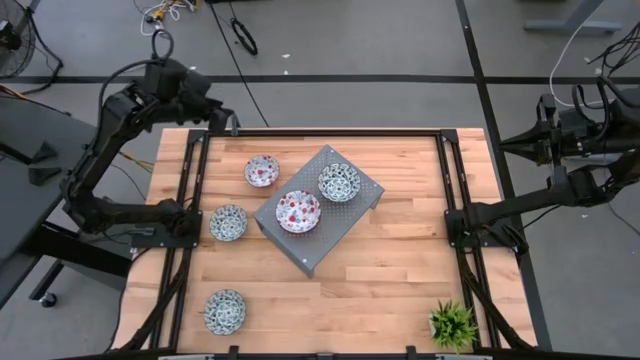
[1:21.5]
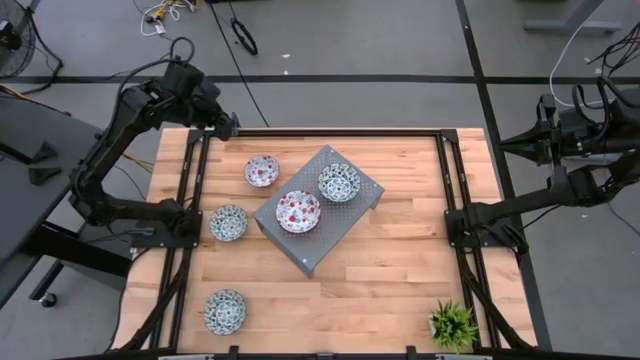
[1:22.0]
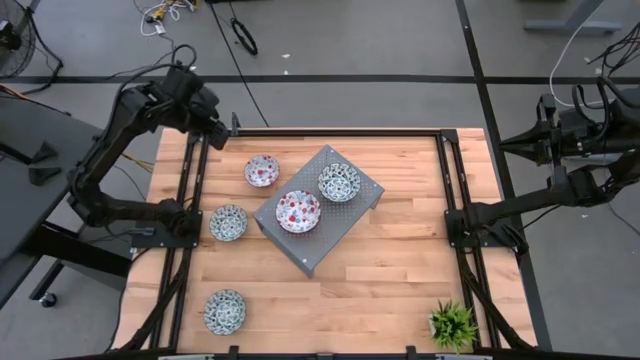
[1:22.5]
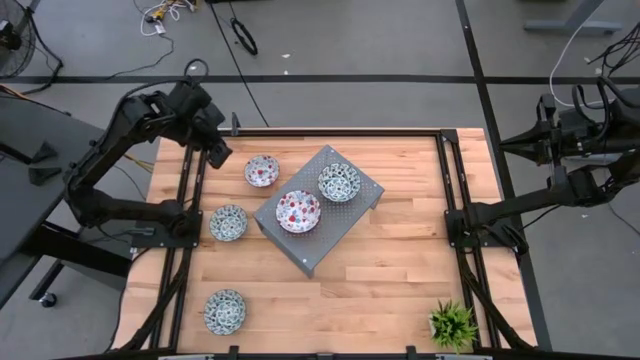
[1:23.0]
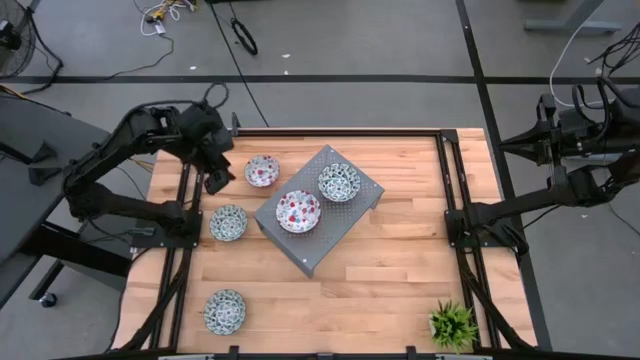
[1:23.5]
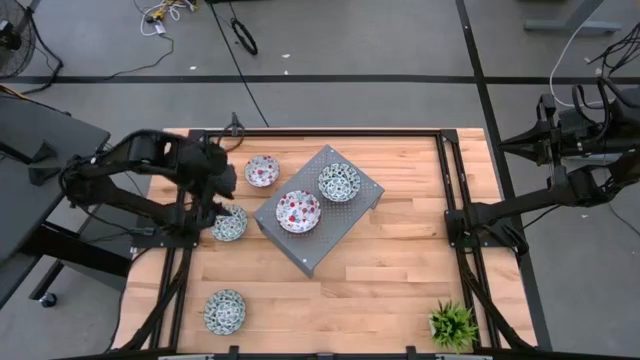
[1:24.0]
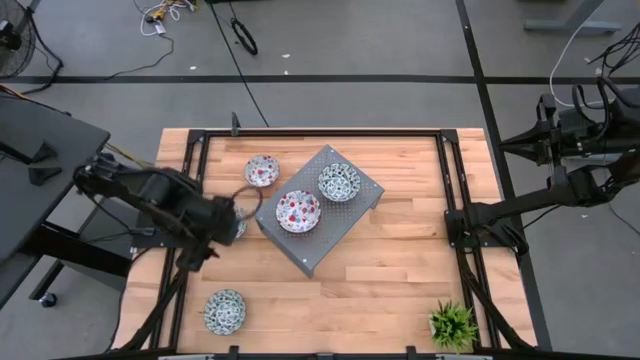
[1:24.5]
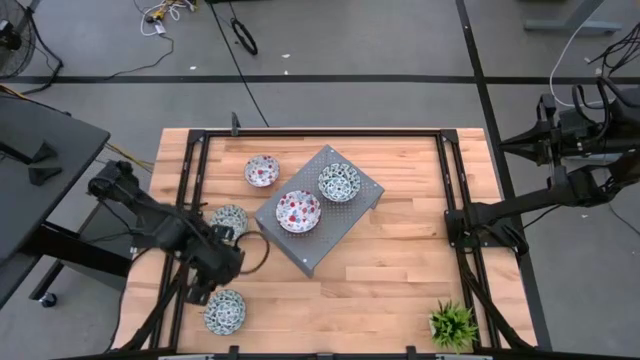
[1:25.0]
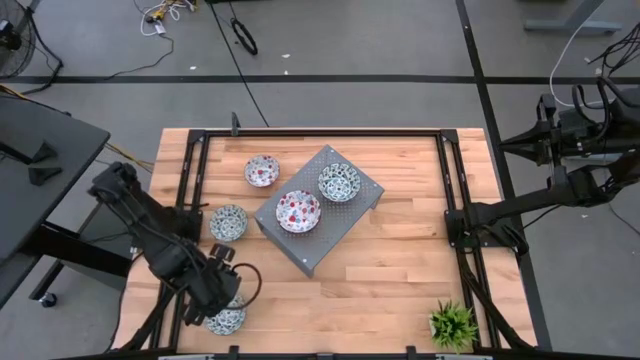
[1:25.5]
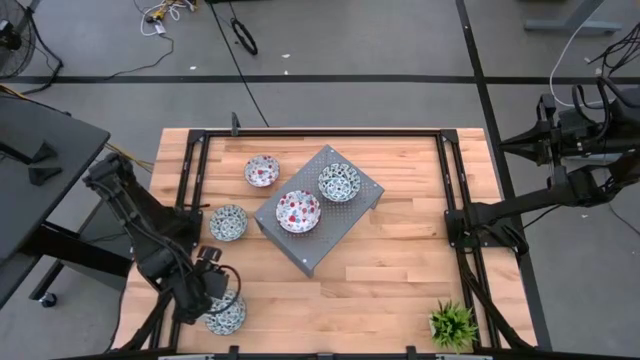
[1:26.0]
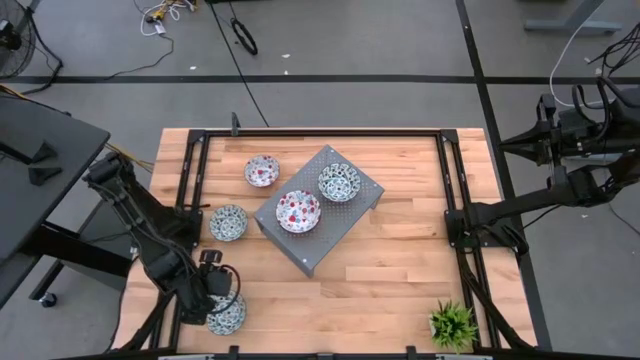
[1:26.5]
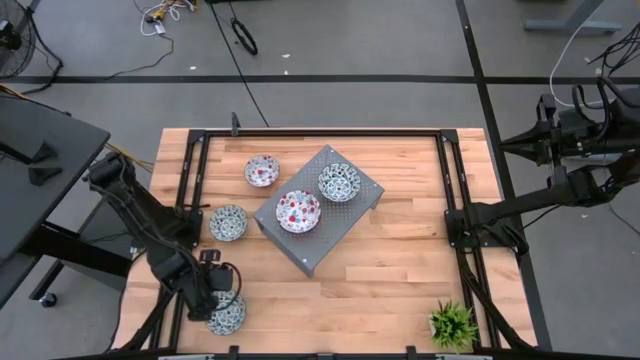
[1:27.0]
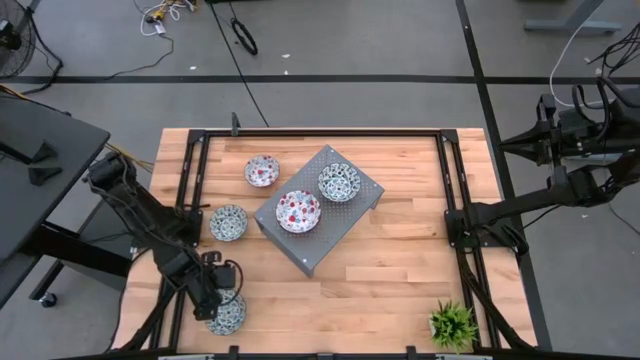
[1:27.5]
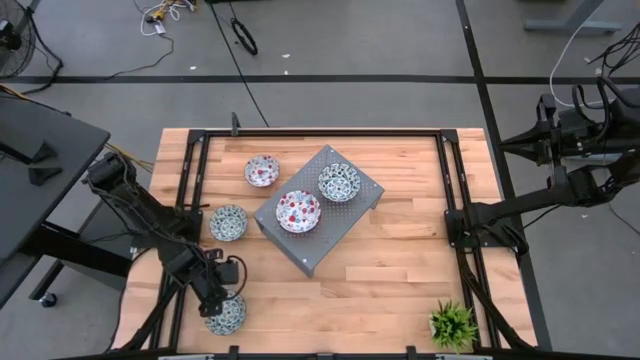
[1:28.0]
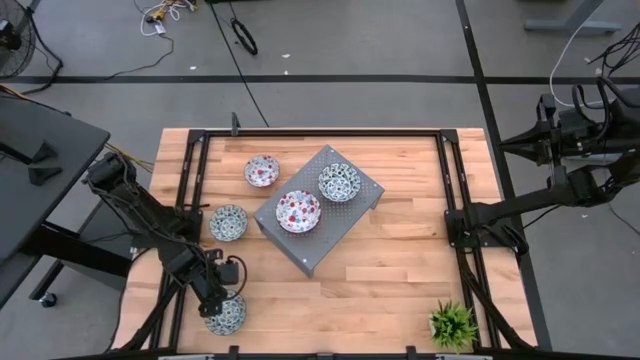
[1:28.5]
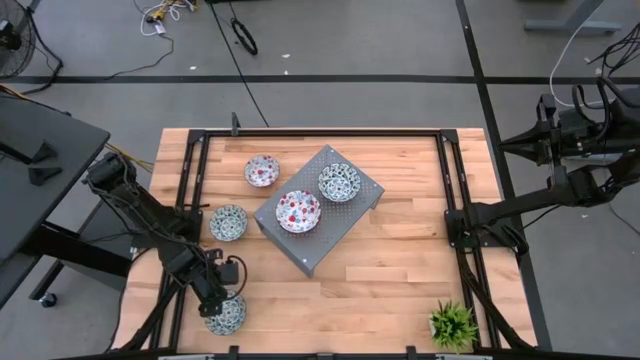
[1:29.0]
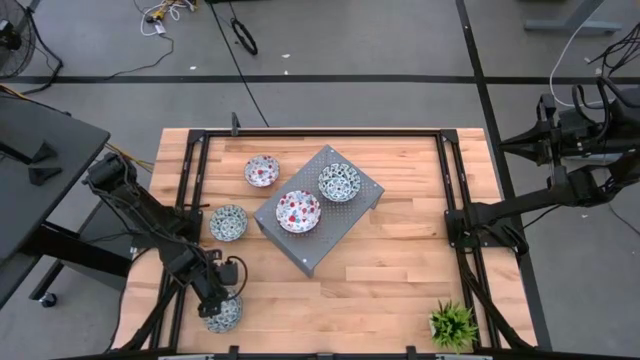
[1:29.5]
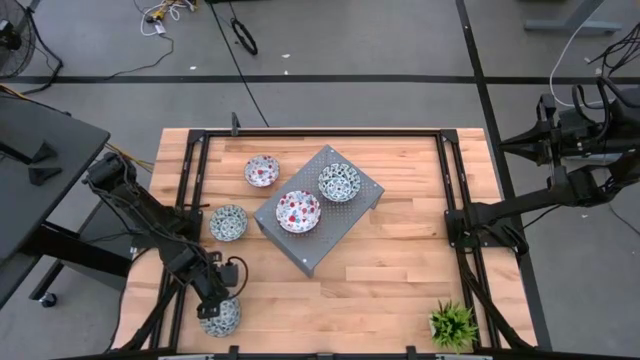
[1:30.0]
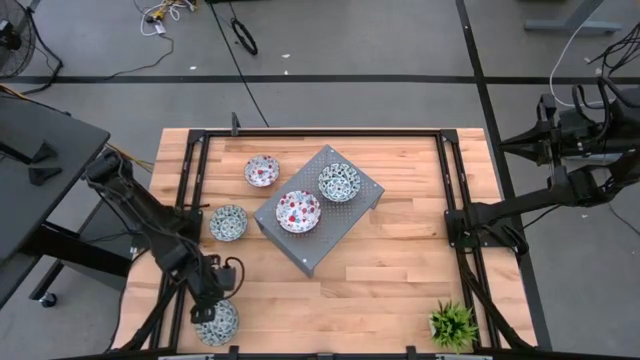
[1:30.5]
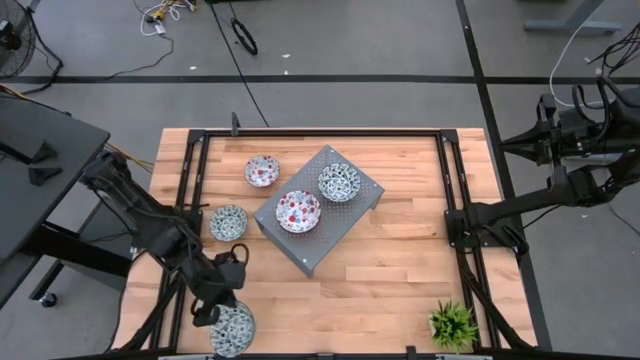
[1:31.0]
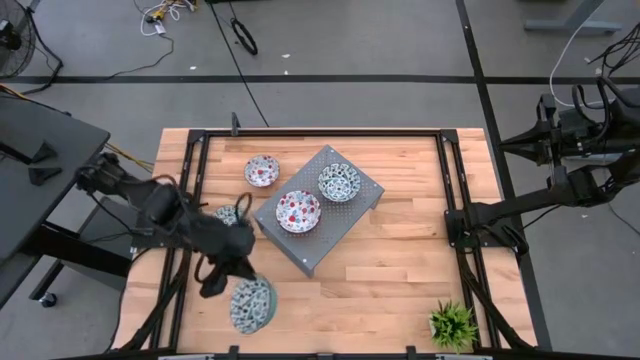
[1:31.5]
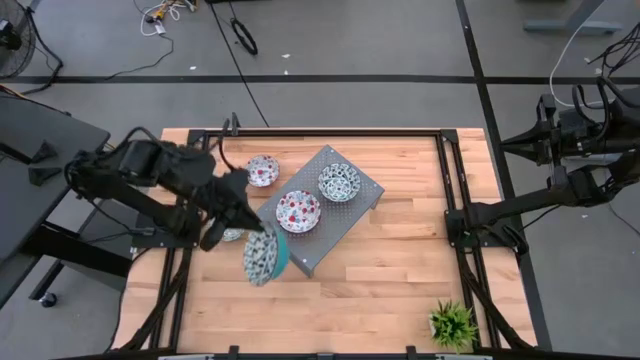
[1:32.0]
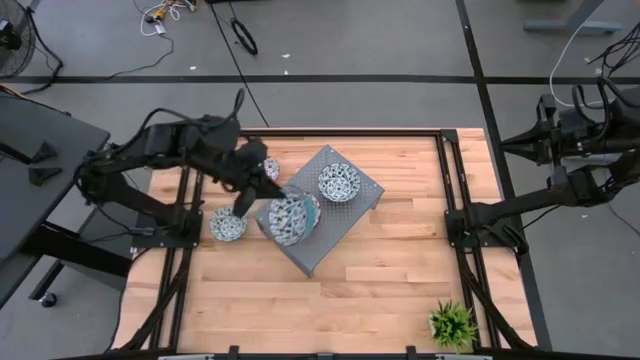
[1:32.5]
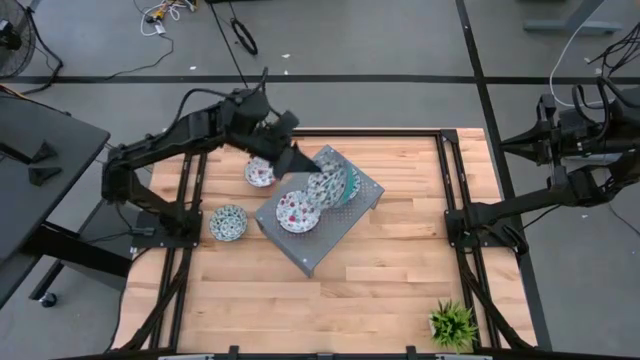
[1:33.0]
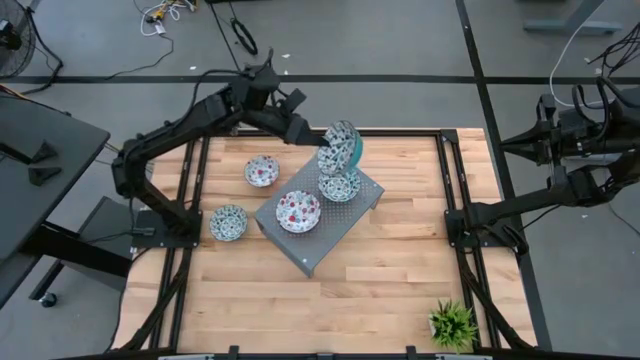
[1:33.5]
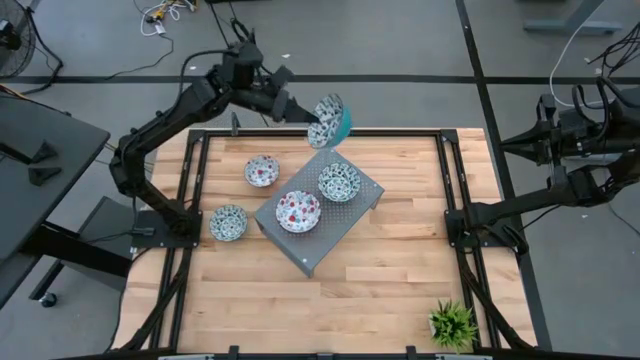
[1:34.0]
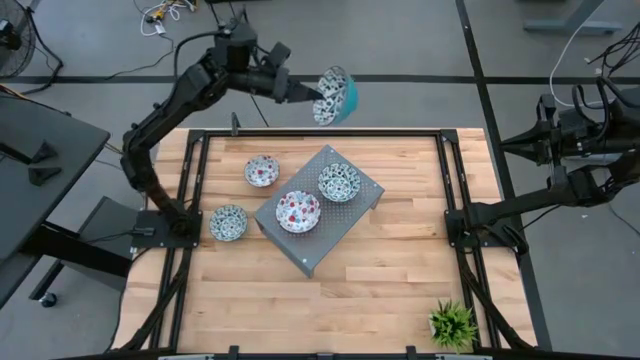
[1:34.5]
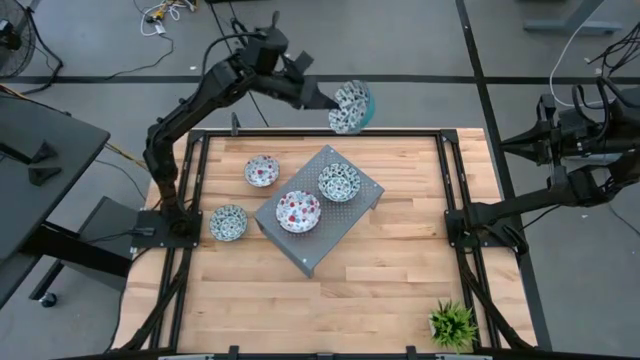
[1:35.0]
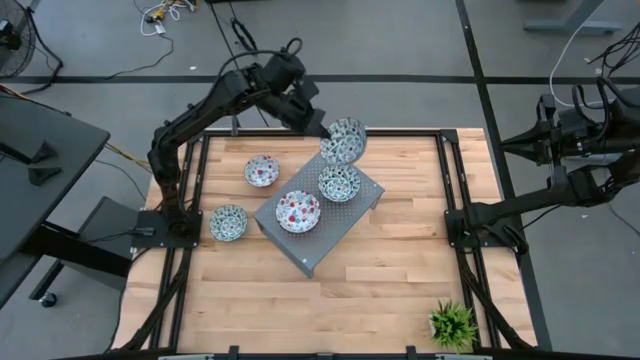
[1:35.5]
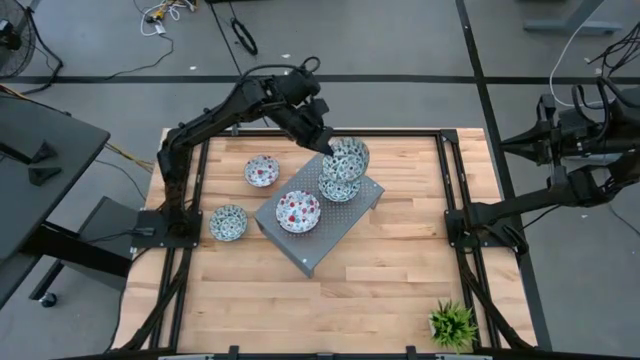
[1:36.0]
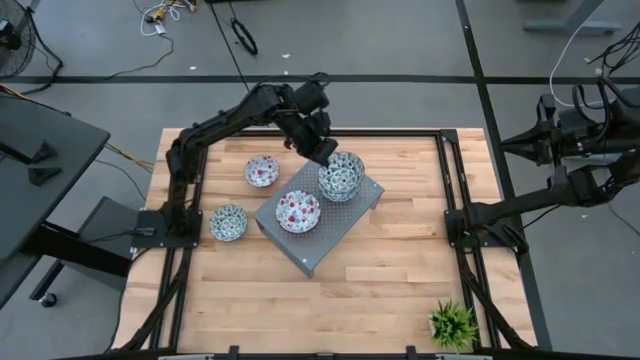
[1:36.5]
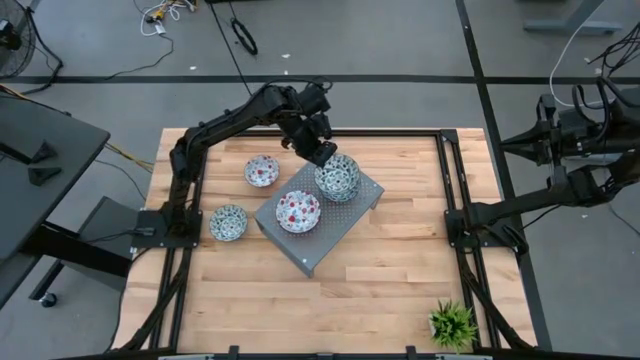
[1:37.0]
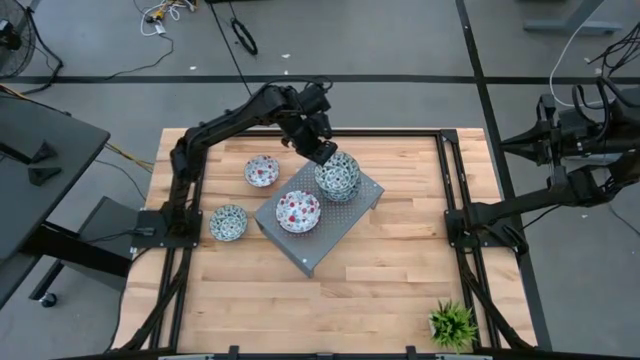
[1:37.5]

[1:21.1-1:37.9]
Task: Pick & Place Mini bowls
Stack the bottom blue patterned bowl on top of the blue patterned bowl on the shelf

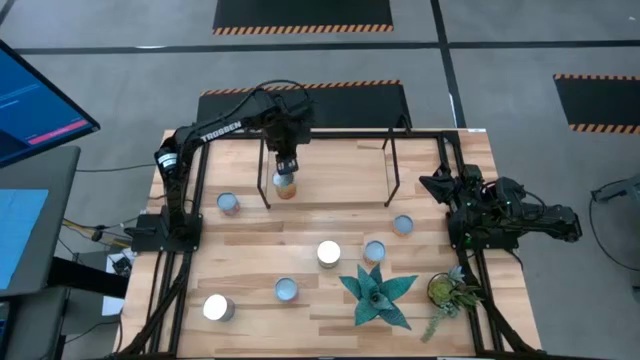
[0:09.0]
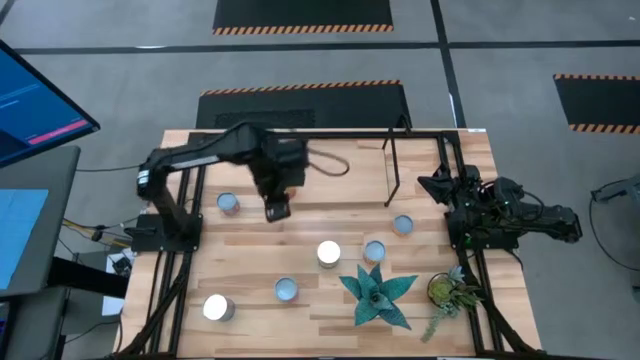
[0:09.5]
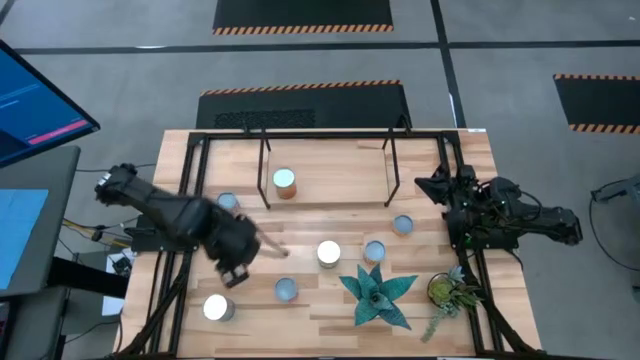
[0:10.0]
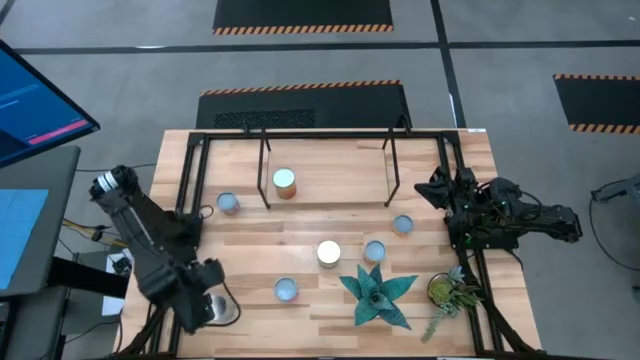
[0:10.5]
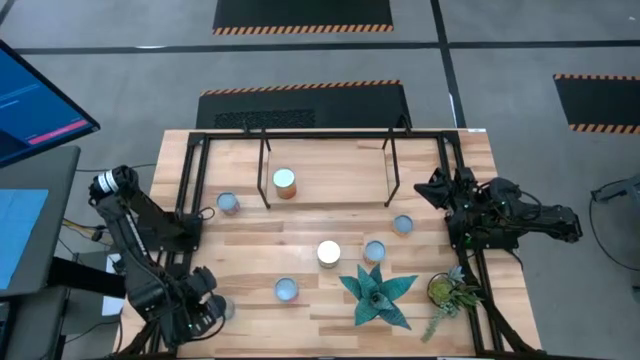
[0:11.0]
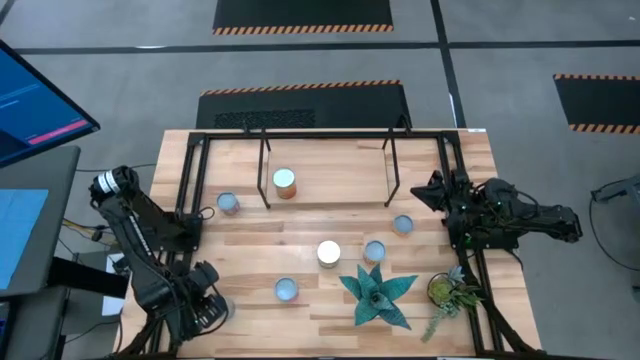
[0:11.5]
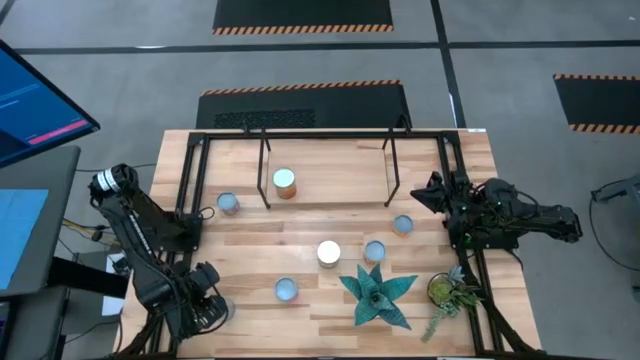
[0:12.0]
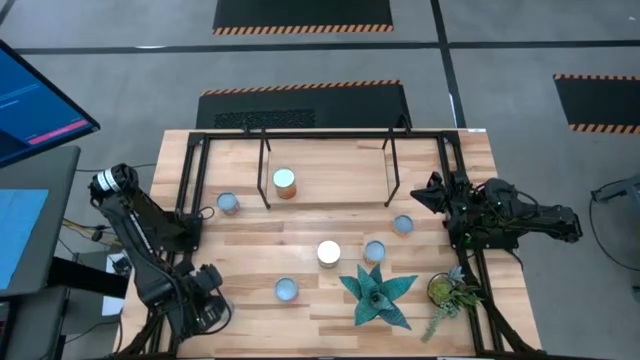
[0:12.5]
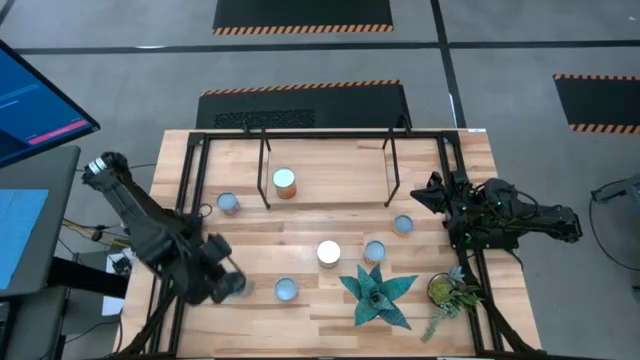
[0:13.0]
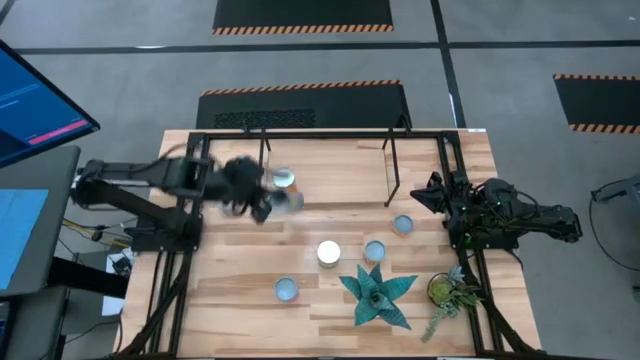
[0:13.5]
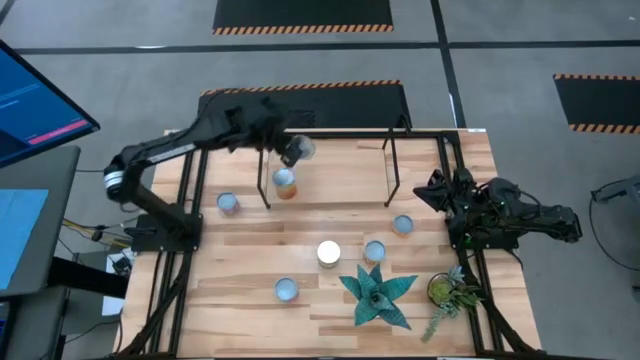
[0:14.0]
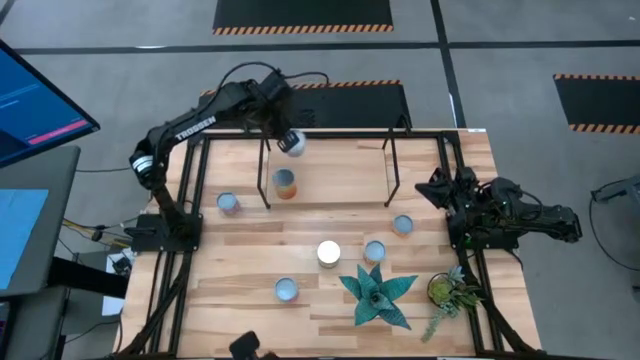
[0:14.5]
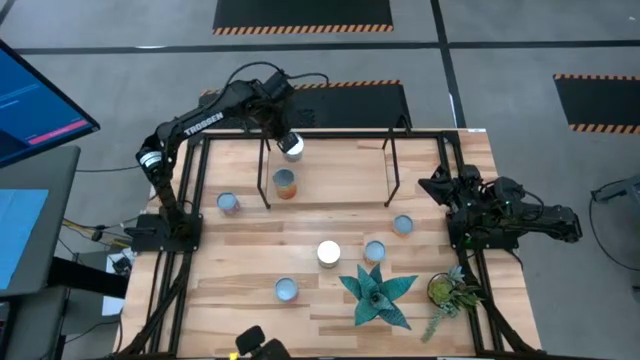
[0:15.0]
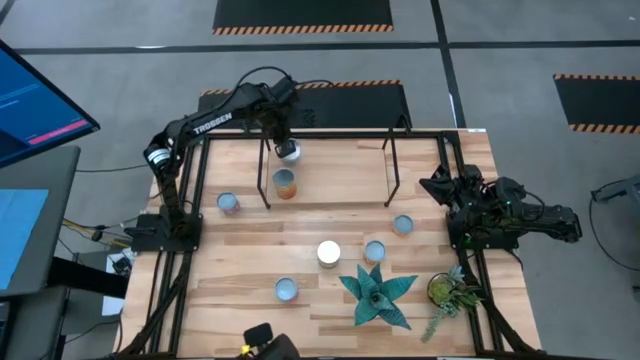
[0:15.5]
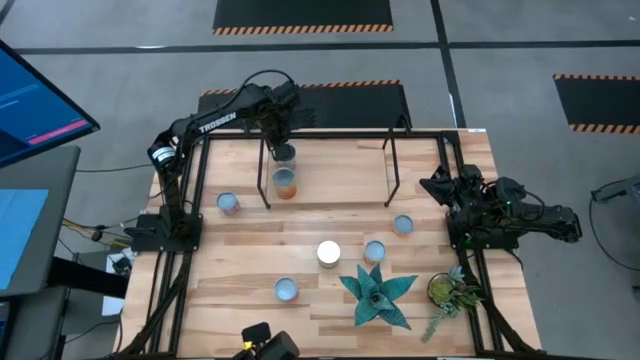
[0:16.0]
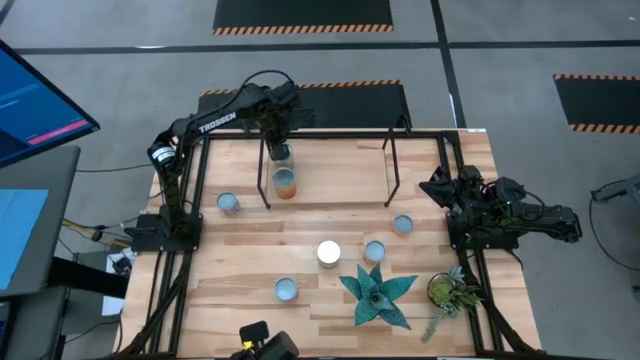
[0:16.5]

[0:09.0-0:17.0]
Task: Pick and place cans onto a shelf
Put the canned tomatoes on the shelf
